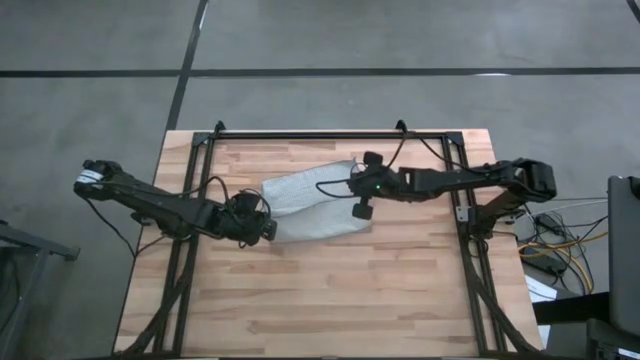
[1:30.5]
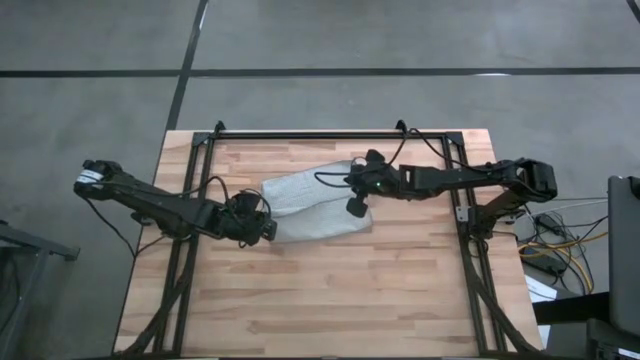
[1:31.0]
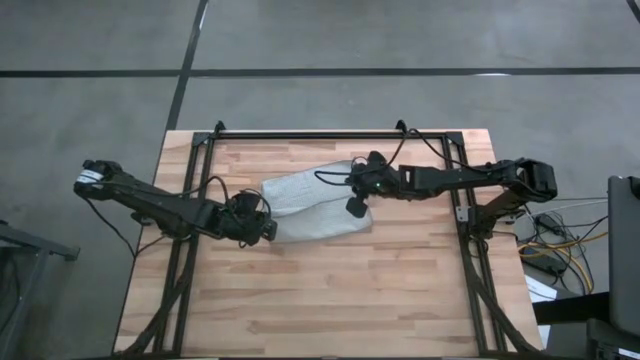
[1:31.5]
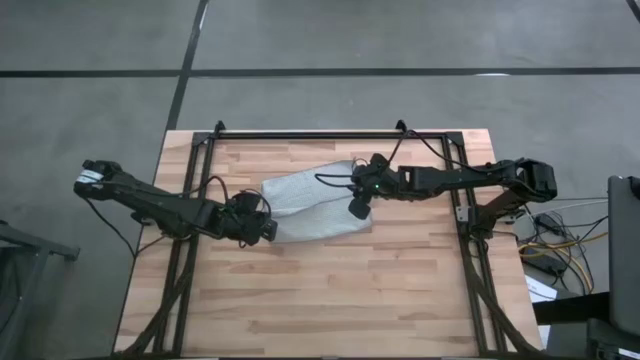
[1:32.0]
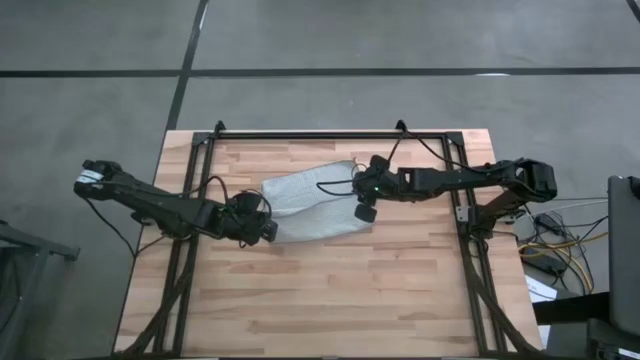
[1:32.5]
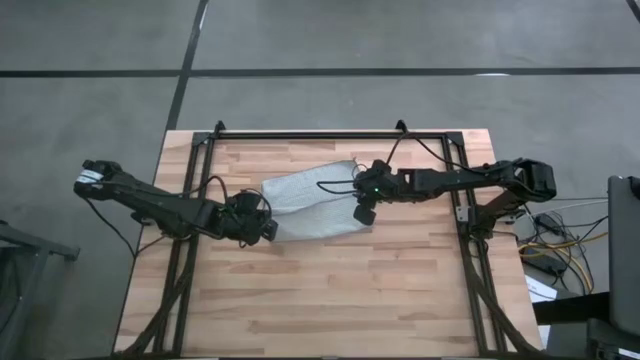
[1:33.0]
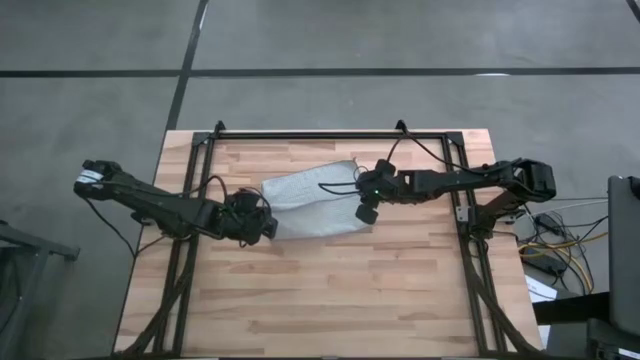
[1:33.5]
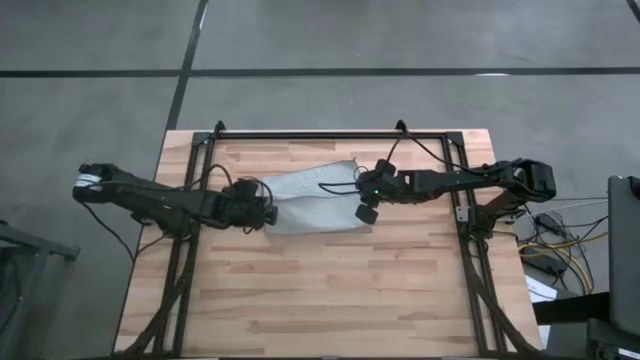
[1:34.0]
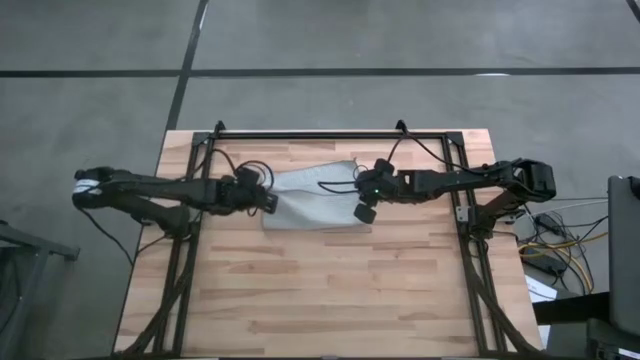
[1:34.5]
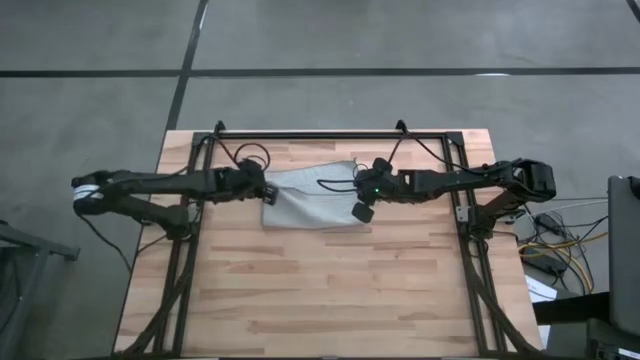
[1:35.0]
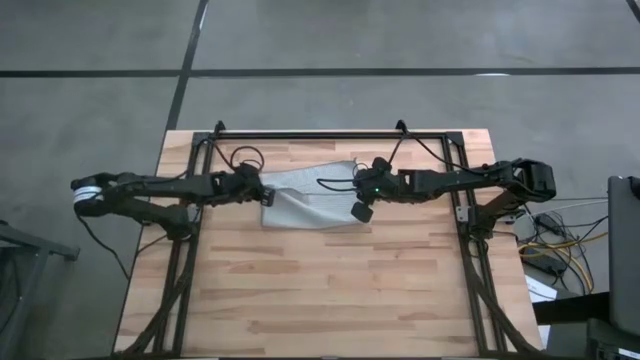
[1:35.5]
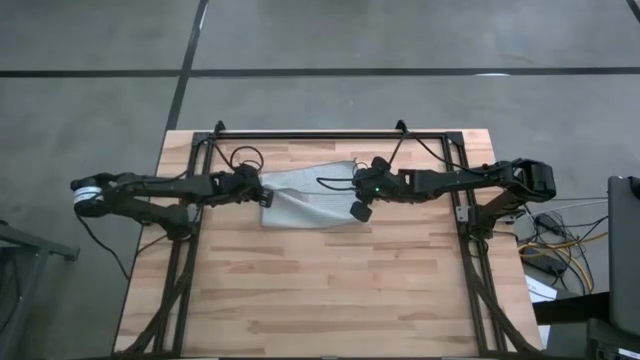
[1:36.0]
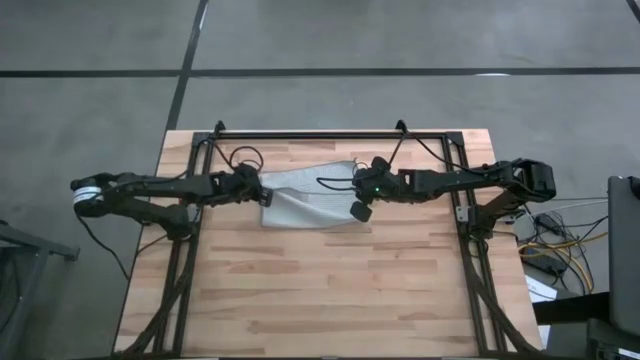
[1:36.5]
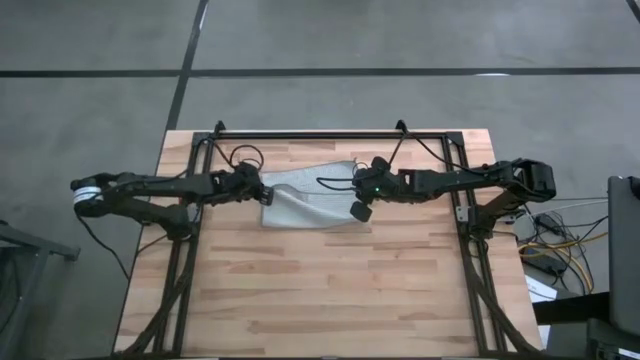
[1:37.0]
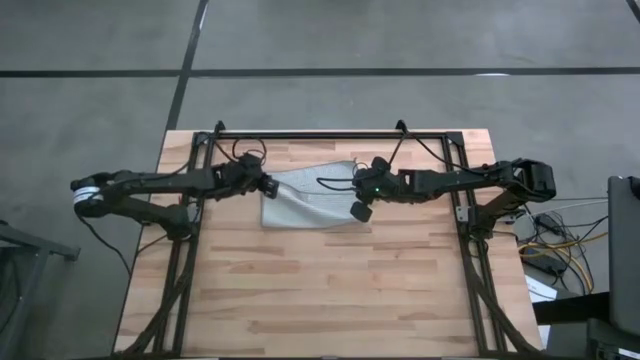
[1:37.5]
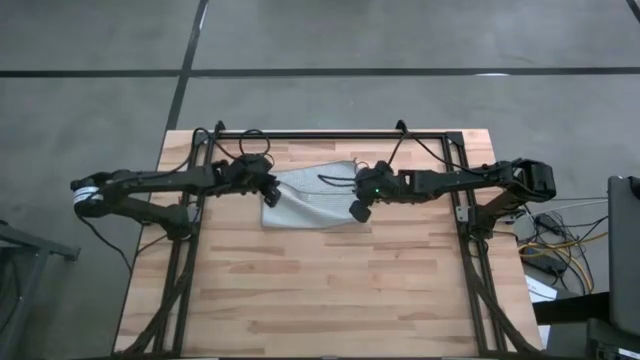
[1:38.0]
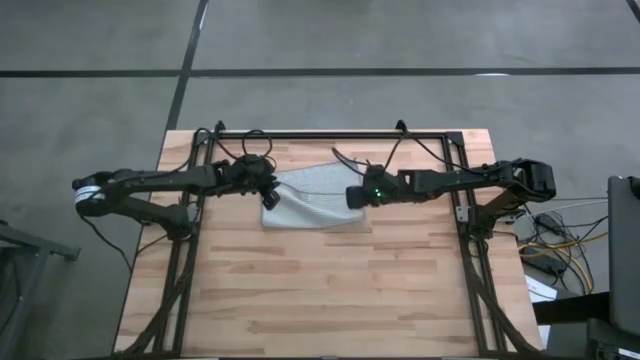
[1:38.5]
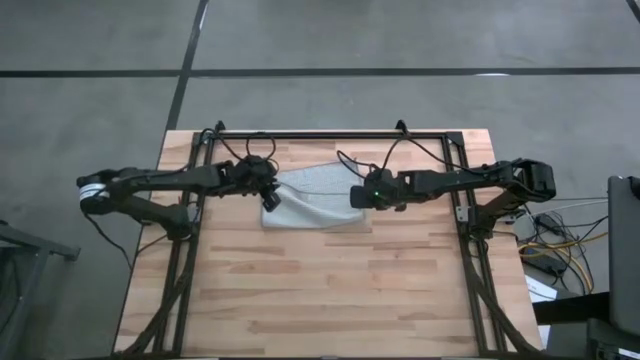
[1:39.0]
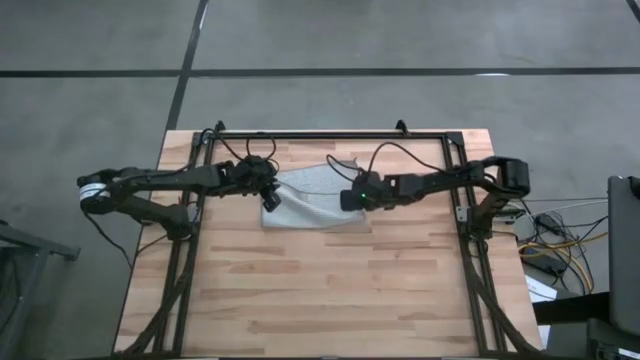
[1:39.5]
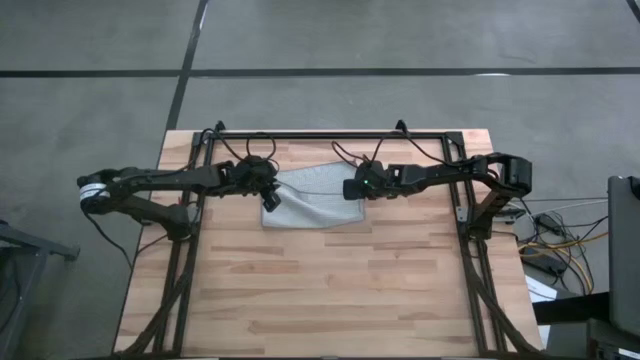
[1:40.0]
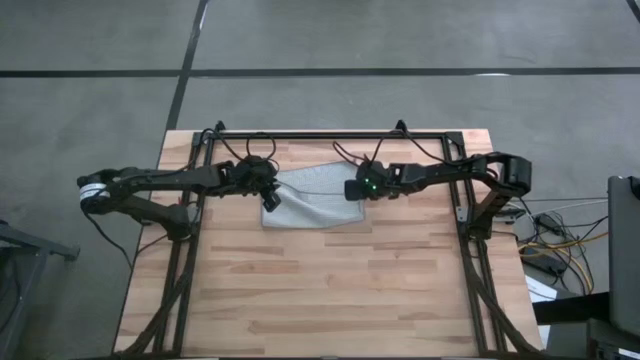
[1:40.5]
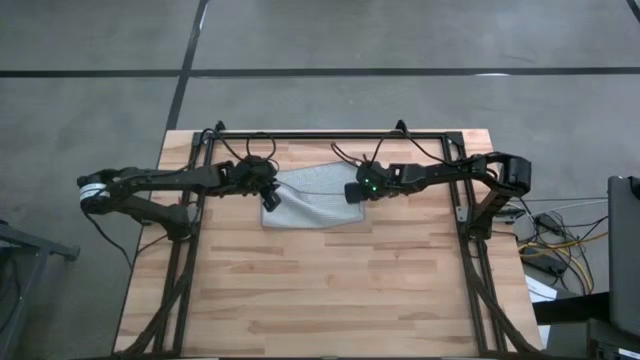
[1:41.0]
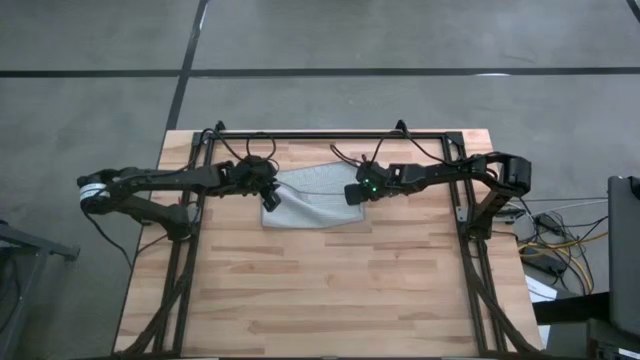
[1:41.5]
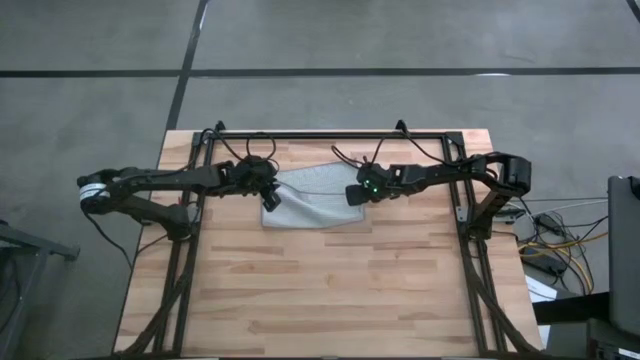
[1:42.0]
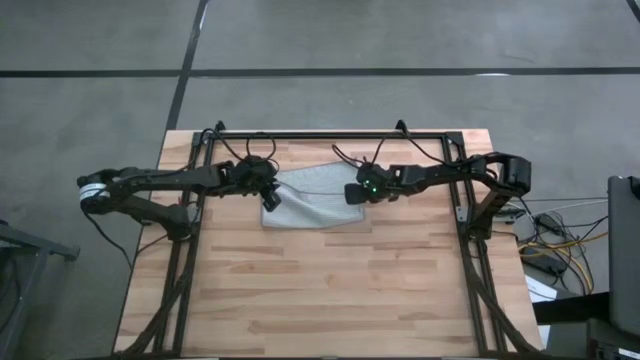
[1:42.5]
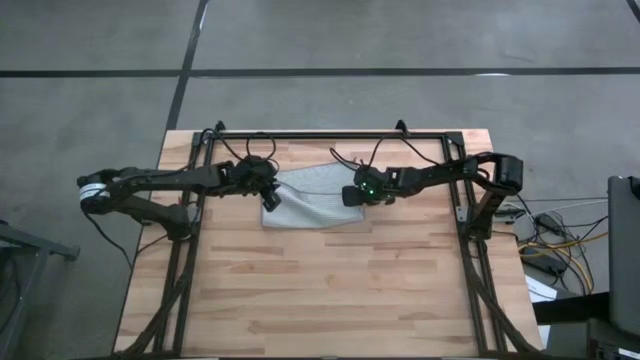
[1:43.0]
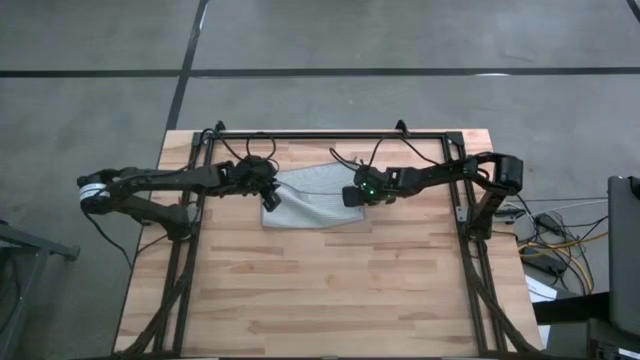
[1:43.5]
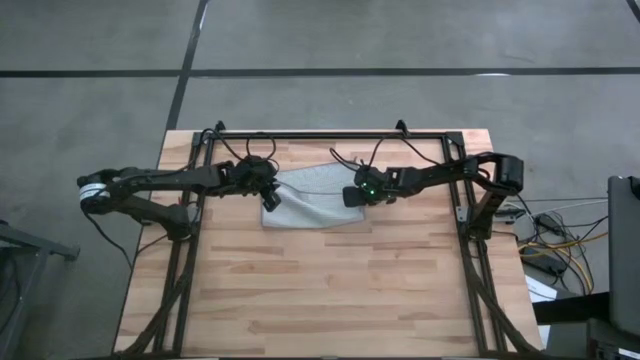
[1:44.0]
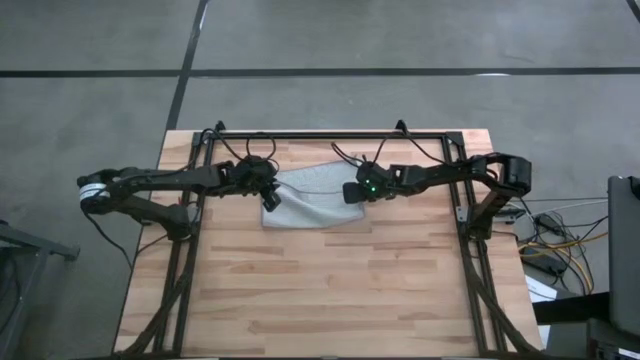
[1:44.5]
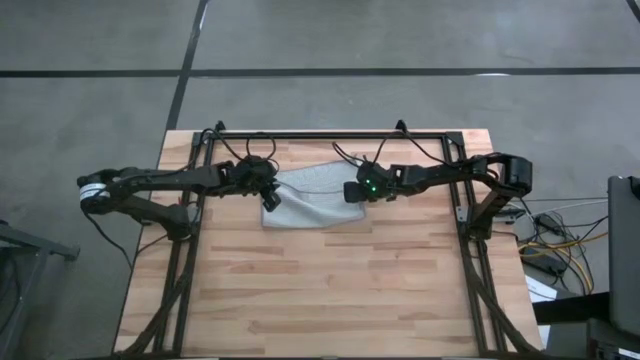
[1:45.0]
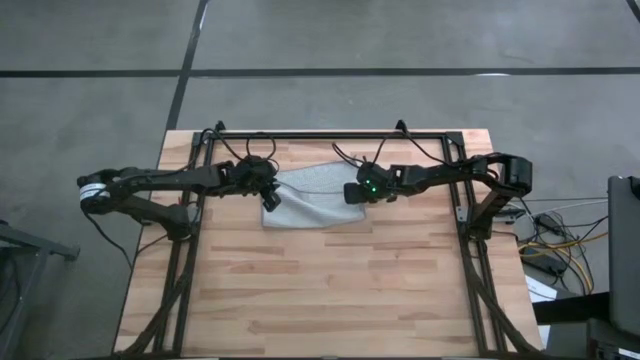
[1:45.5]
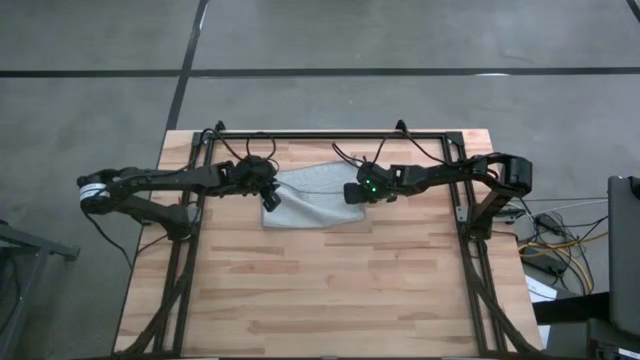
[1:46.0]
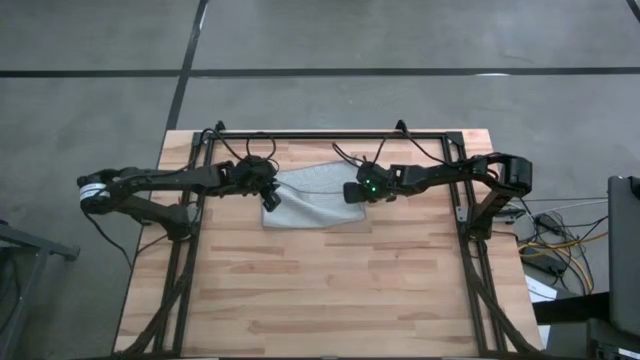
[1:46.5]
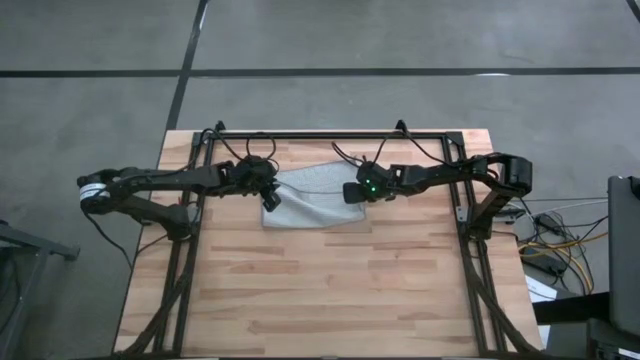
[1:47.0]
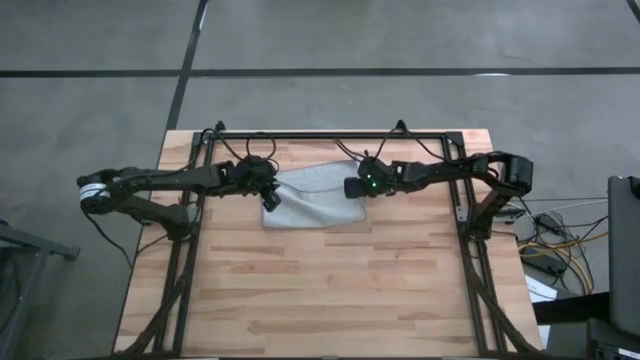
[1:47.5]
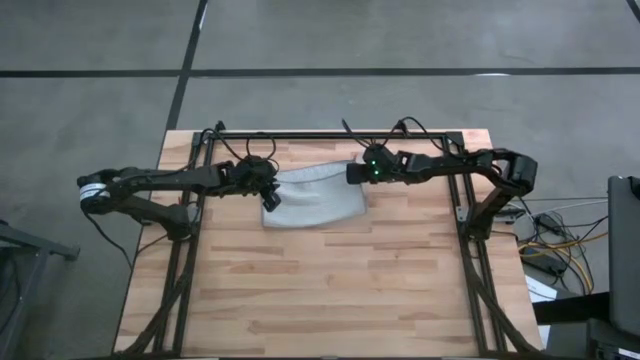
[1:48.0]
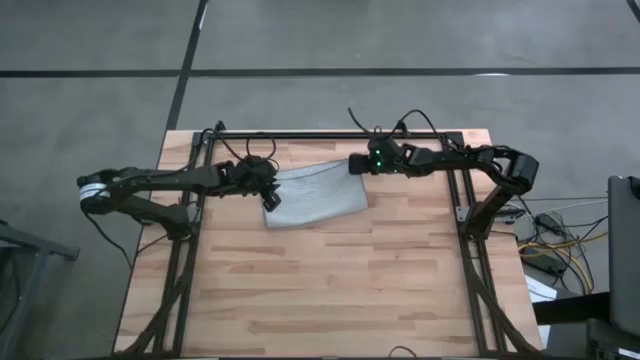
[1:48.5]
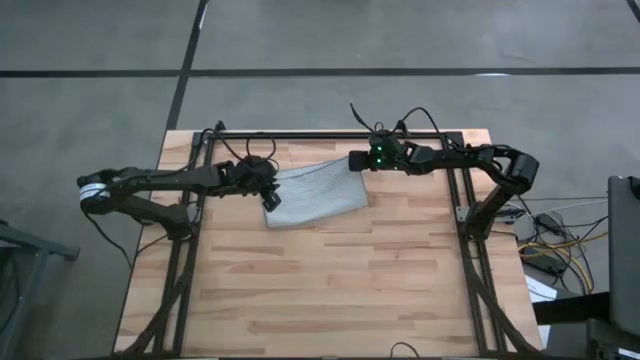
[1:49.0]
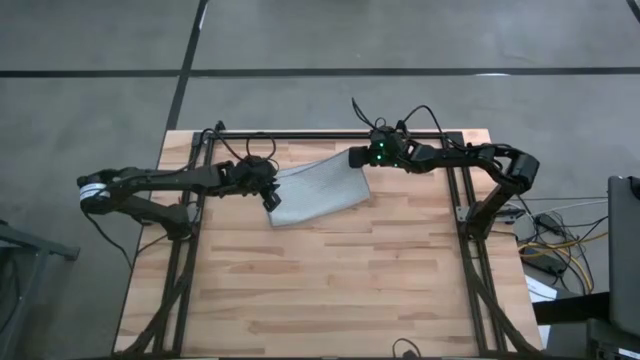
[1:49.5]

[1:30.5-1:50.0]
Task: Roll towel
Fold the gray towel

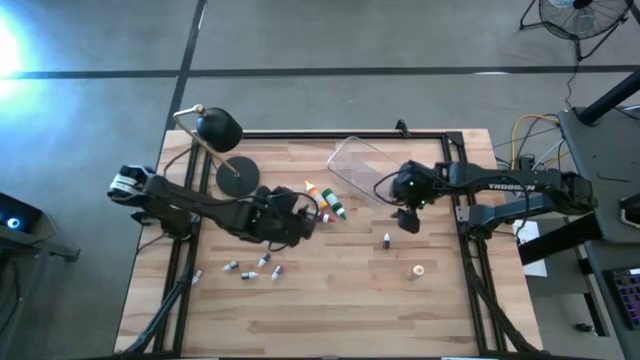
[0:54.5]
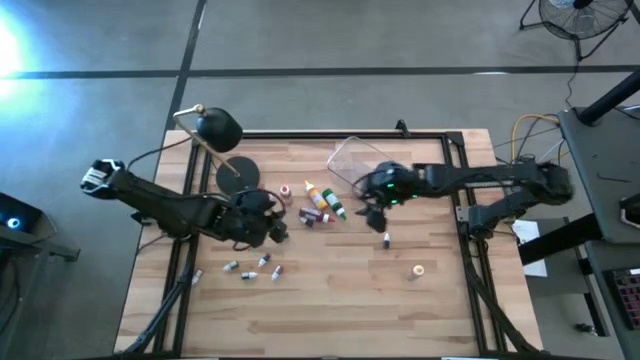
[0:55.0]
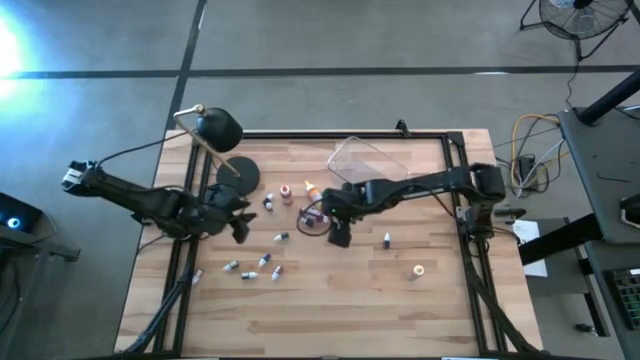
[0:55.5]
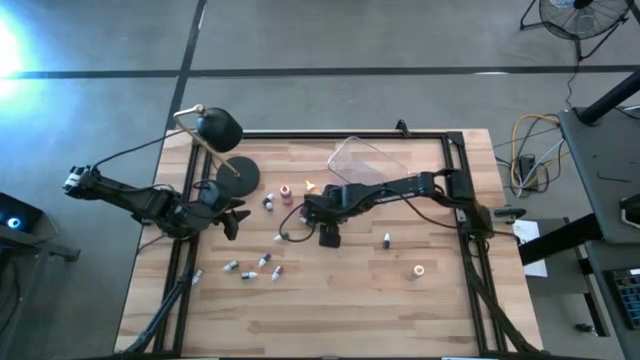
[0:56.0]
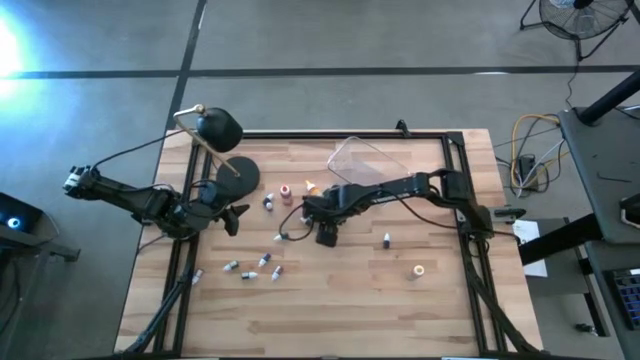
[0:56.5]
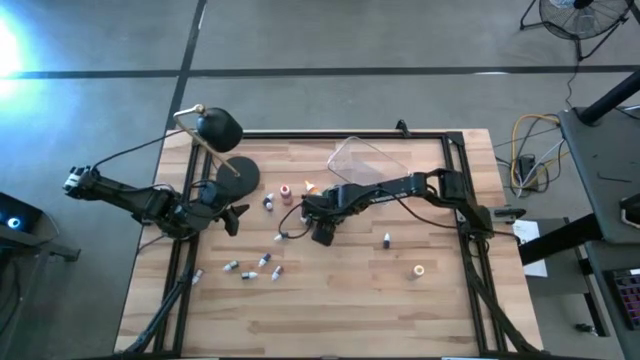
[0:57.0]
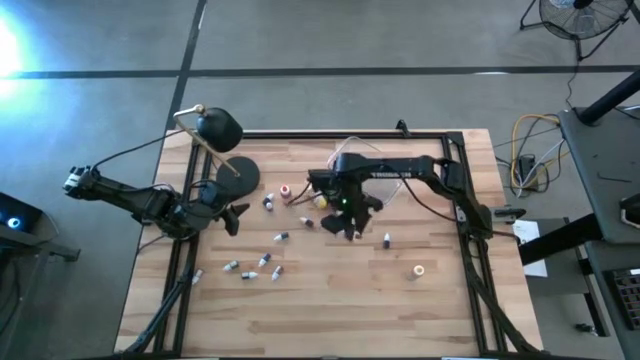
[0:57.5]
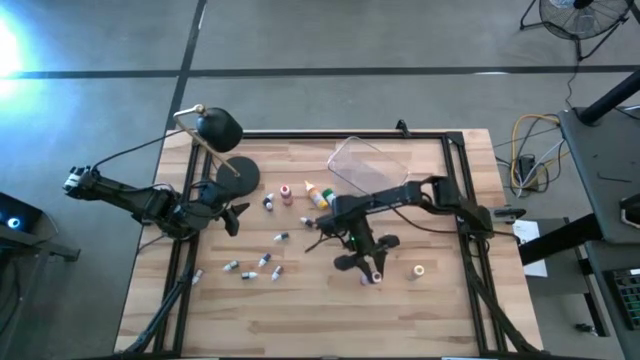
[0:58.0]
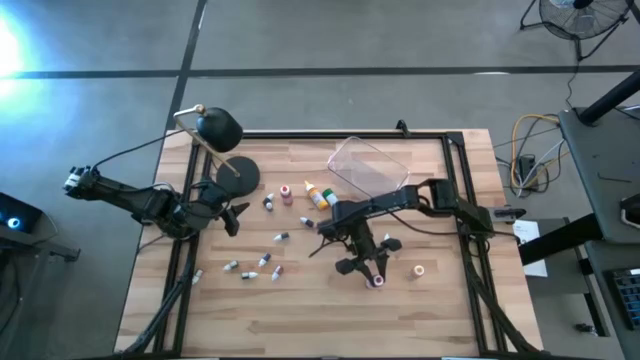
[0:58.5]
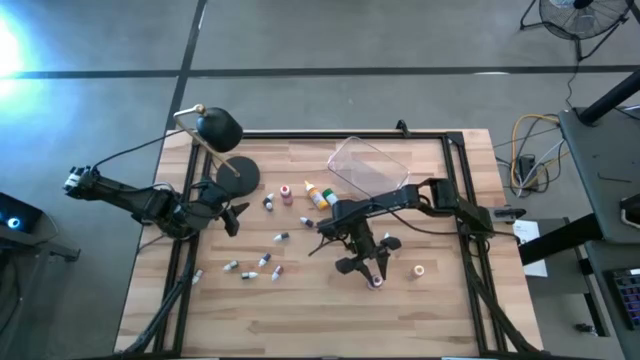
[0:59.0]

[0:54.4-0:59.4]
Task: Pick & Place food coloring
Adjust the large red food coloring bottle
